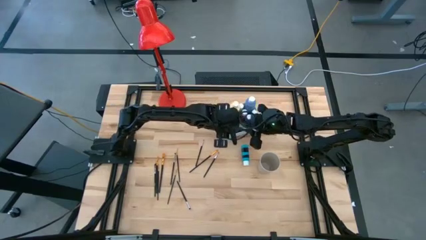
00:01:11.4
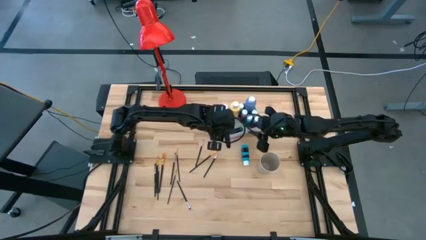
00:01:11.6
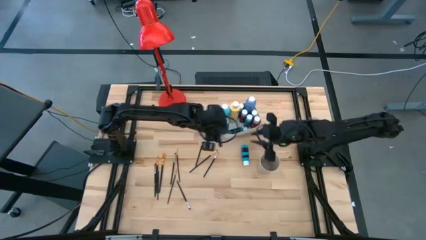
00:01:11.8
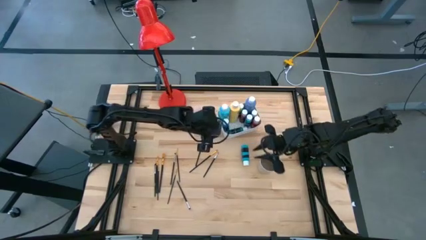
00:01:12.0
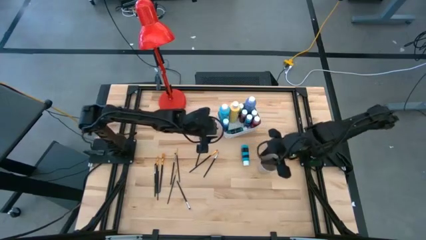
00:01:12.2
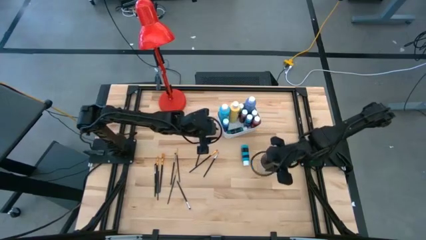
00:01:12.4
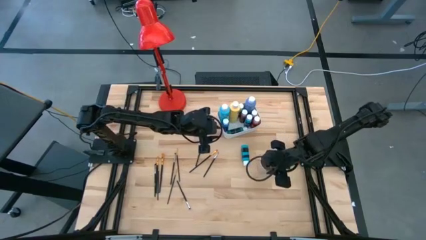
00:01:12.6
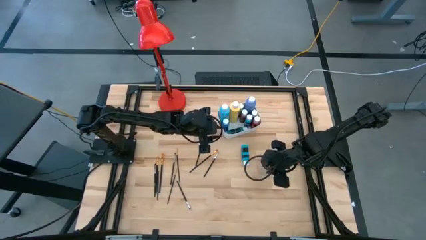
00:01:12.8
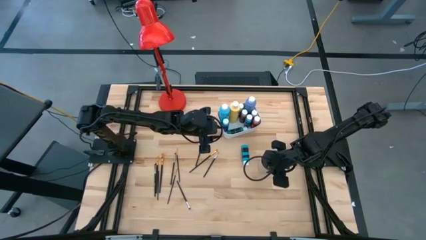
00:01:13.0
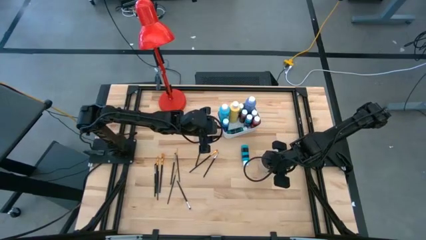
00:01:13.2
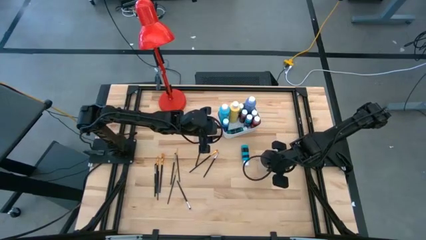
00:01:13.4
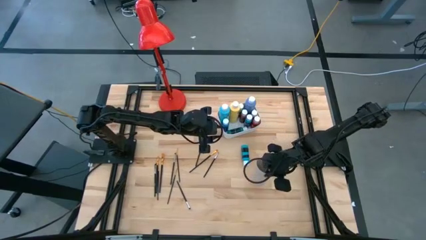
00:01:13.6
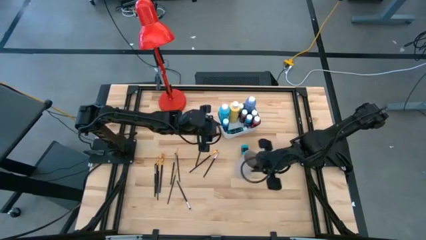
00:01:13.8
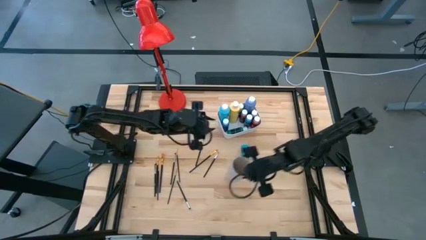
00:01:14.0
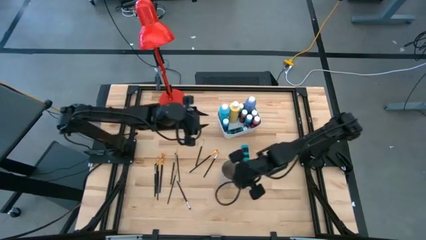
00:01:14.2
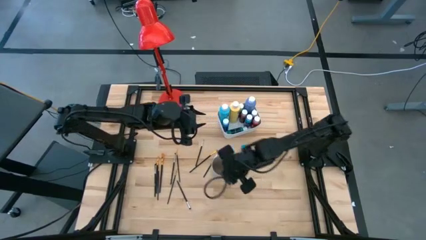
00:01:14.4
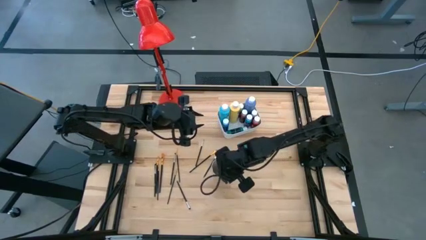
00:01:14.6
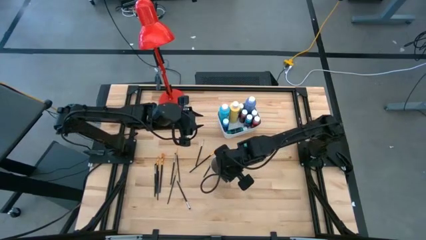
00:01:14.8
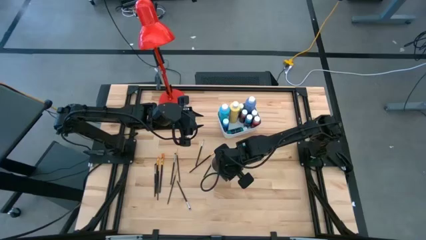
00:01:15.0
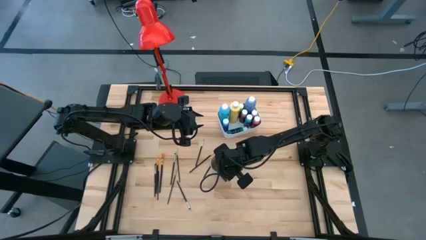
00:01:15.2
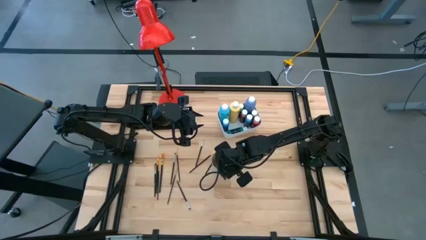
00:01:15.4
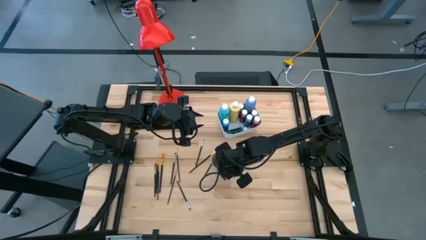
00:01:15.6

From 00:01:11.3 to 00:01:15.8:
Task: Pick & Place Paint Supplies
Move the white cup to the center of the table

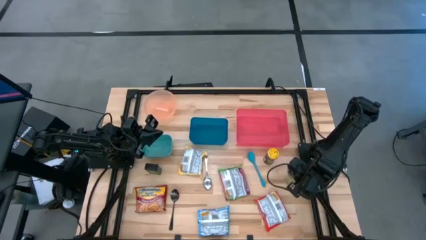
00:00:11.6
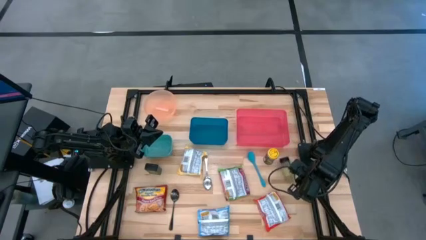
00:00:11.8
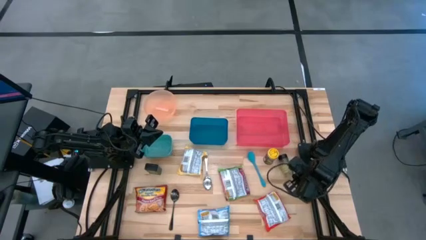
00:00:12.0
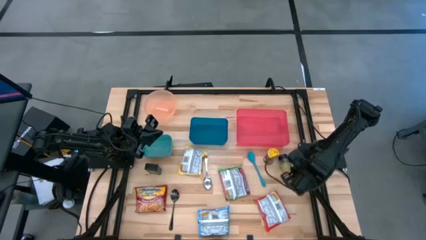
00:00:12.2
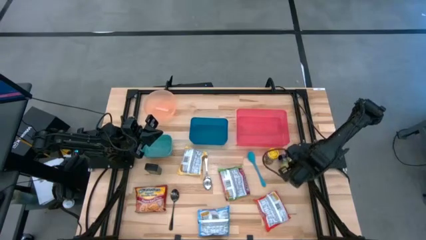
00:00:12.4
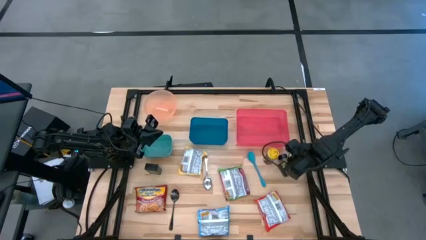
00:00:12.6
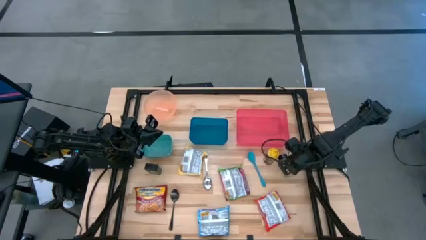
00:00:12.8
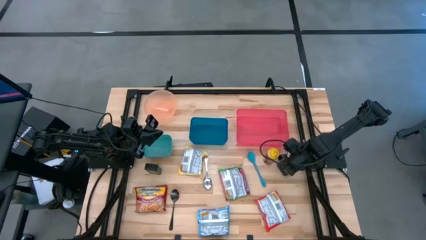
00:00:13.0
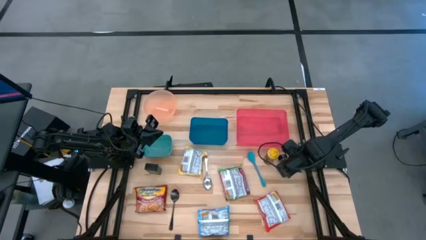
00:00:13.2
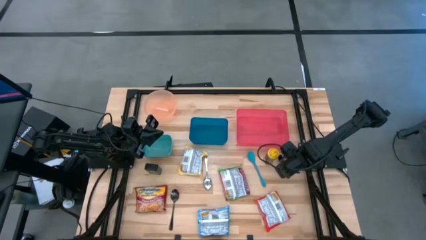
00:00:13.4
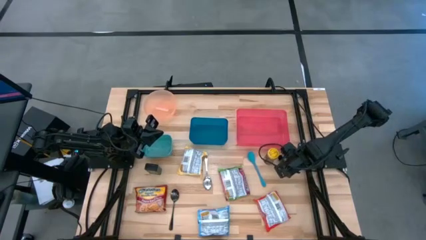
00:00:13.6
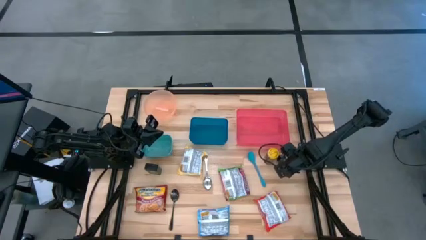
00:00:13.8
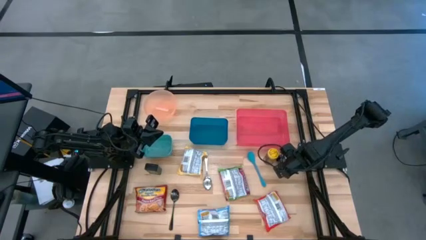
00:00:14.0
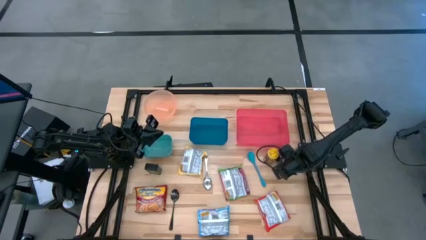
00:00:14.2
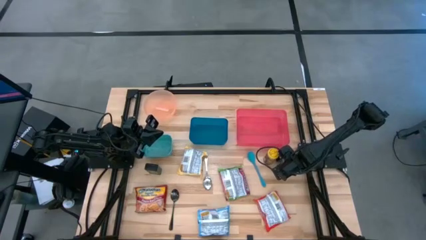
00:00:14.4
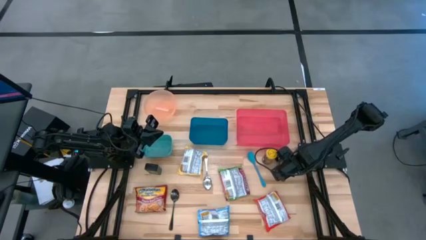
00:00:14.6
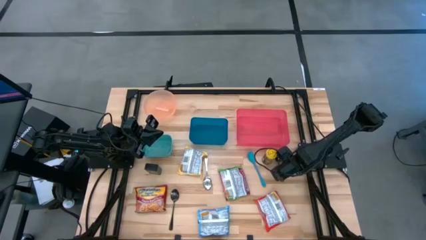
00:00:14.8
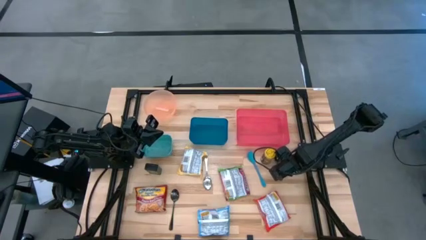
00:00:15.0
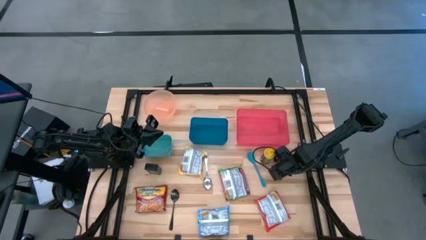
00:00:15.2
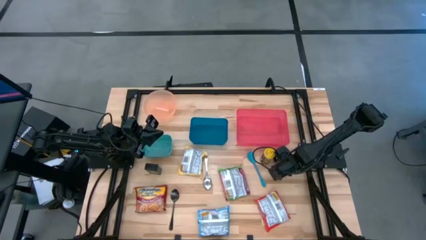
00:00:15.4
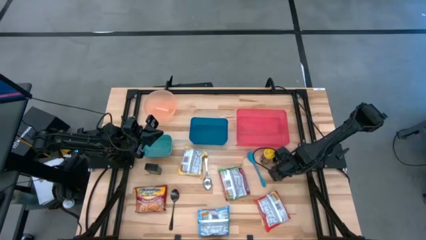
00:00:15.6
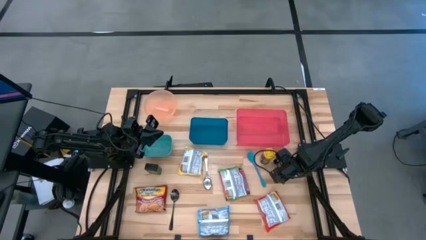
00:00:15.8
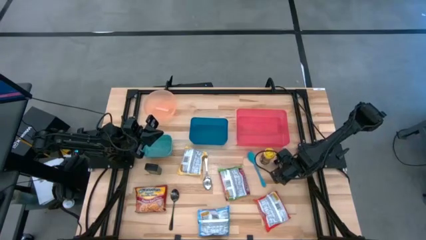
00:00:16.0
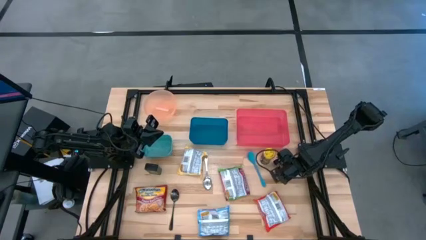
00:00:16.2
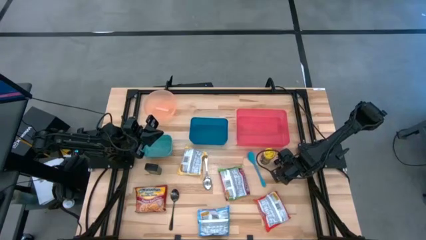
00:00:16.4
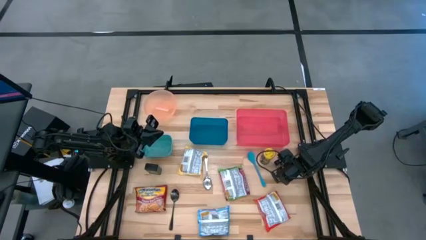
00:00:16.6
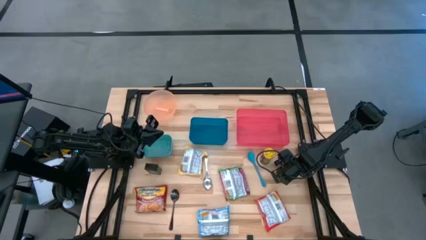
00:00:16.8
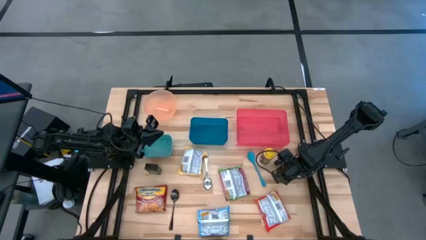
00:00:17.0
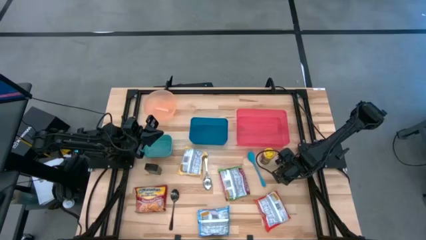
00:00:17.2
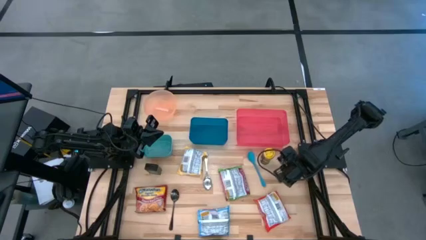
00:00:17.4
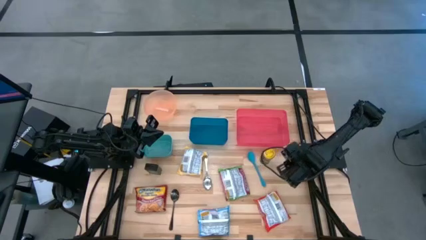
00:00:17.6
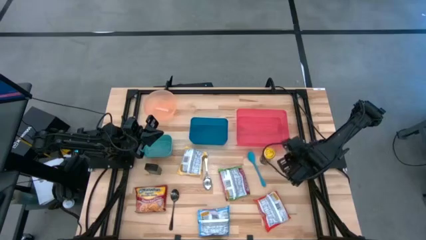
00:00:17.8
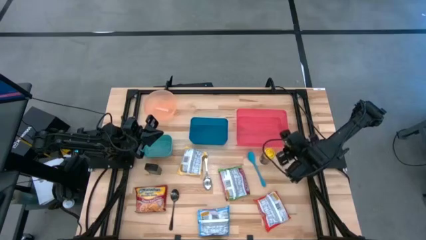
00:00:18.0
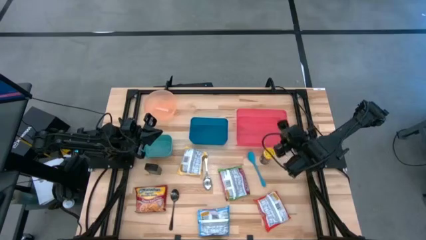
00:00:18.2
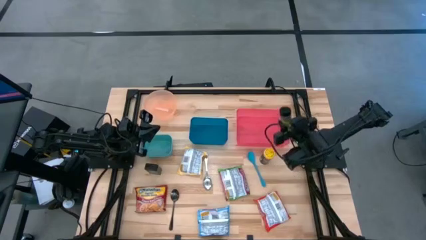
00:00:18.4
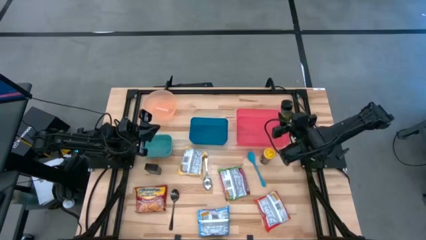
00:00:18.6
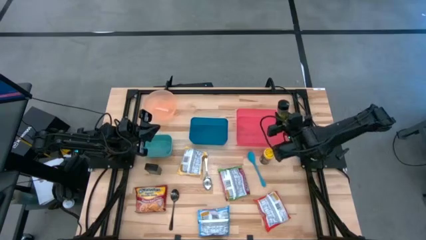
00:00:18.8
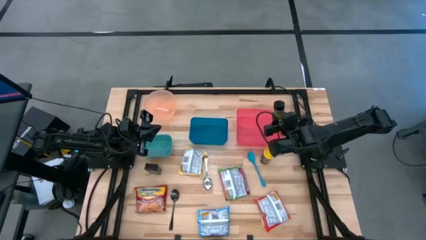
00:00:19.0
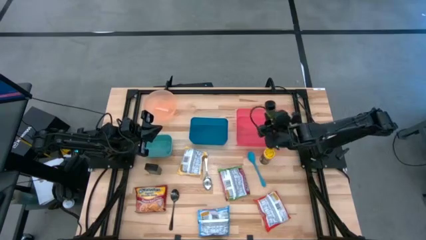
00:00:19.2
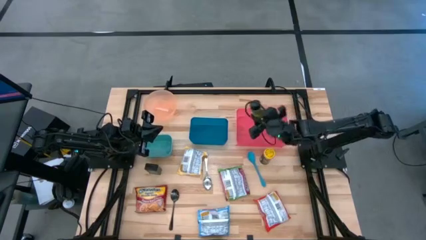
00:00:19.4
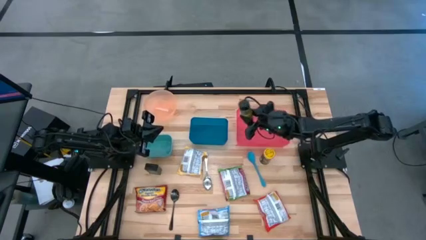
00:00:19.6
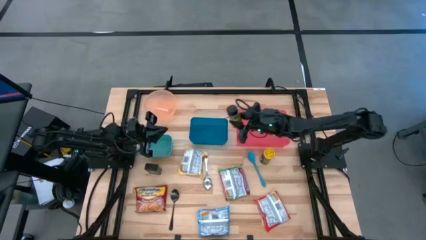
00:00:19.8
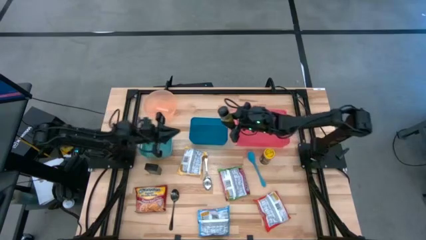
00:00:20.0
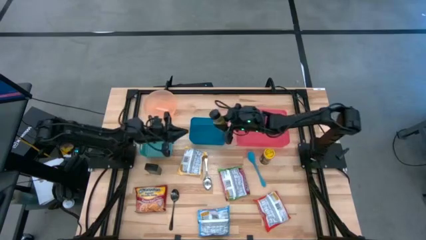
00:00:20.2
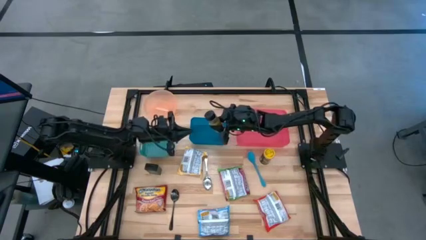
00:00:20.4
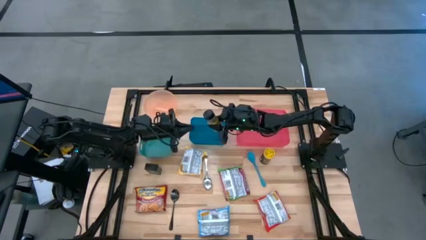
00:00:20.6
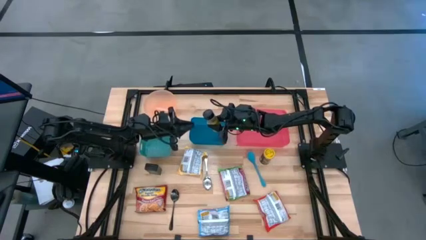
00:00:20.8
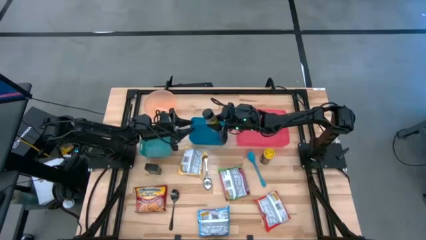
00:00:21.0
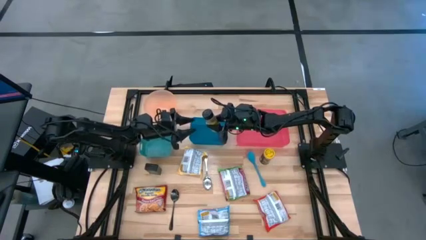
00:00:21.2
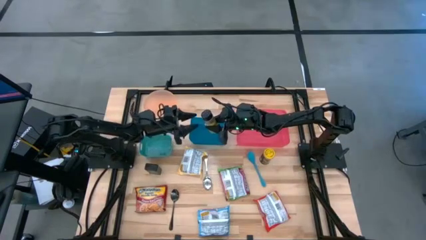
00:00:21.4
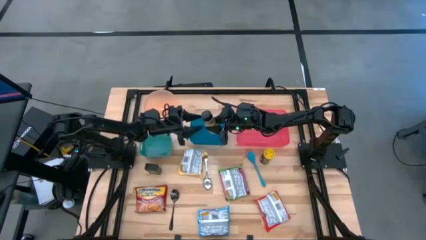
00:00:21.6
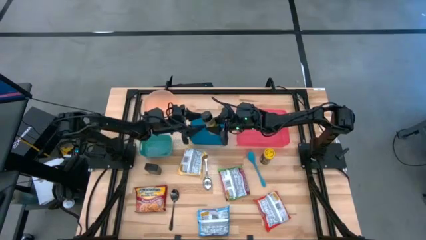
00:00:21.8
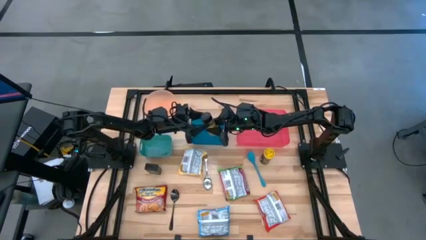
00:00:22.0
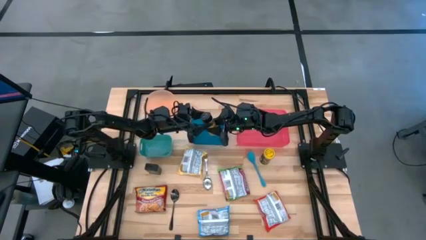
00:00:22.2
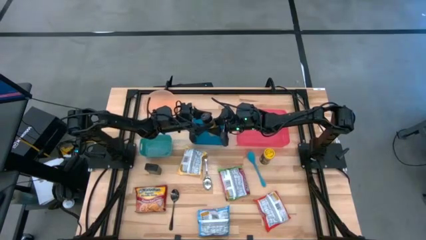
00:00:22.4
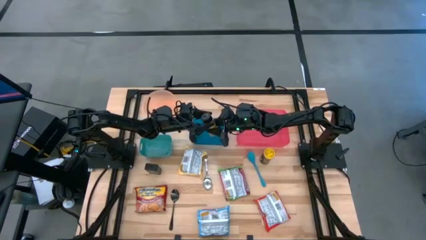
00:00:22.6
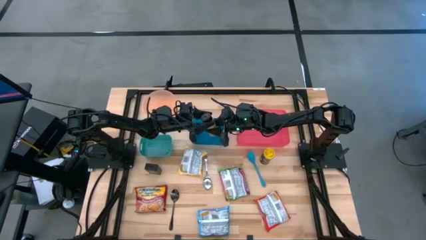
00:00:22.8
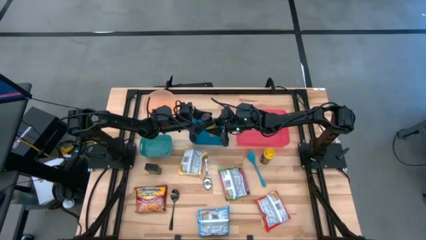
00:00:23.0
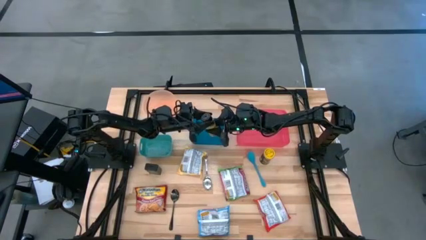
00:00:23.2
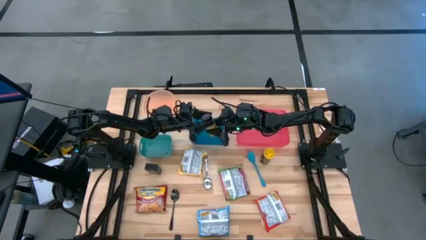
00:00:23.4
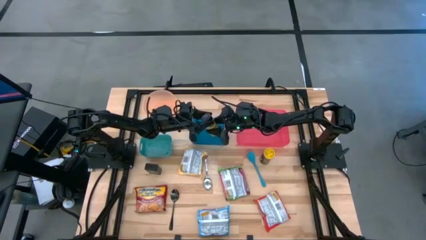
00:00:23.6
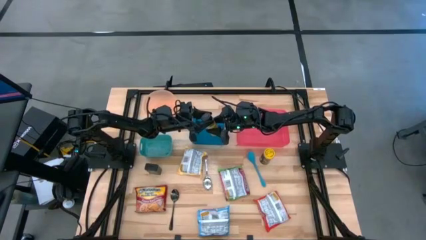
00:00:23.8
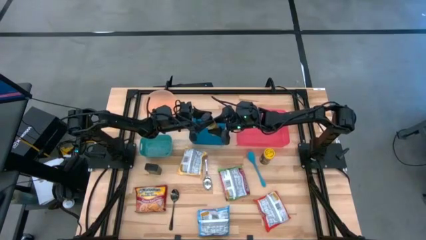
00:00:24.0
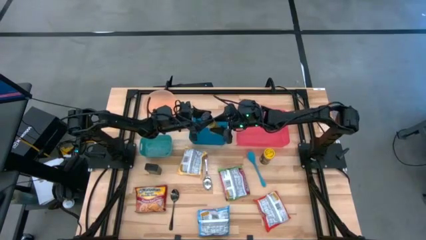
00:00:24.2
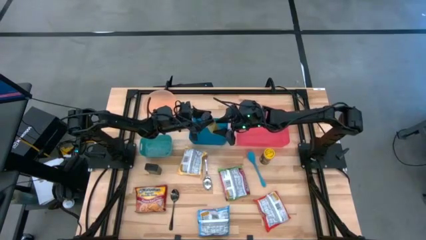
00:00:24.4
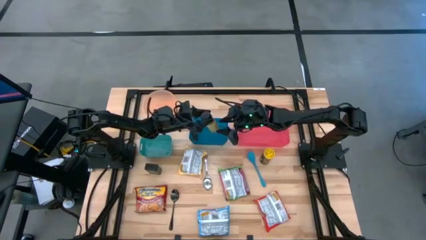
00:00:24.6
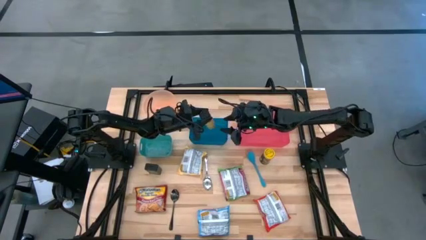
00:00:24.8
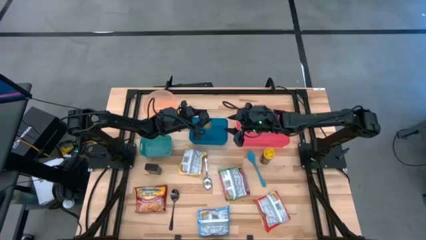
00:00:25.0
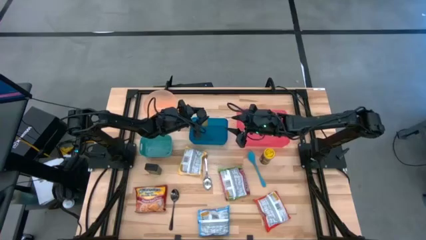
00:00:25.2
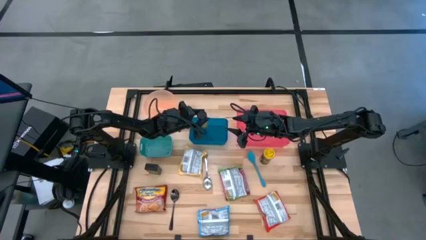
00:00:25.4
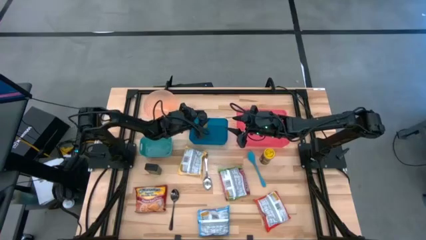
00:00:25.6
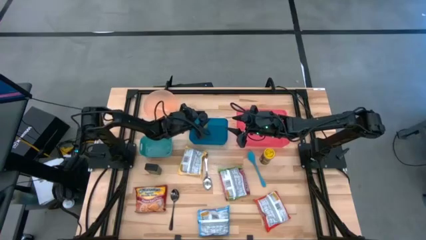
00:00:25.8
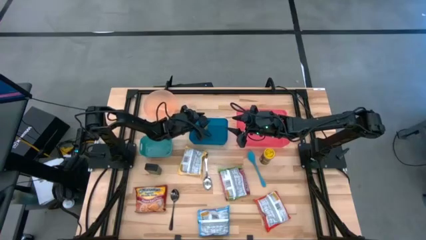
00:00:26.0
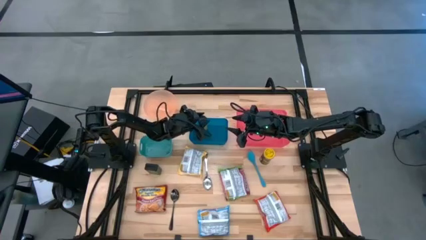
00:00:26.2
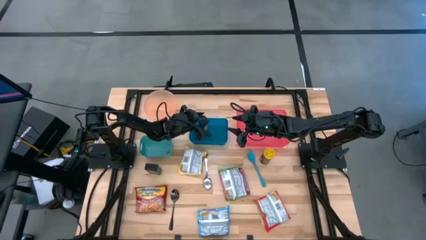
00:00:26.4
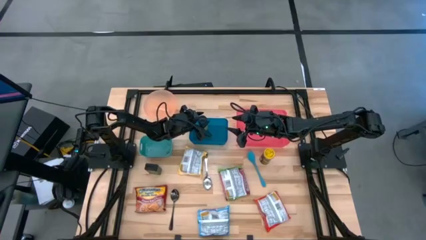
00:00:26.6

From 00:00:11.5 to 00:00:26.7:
Task: Pick & Place Food Item
Put the green seasoning bottle into the blue bin
